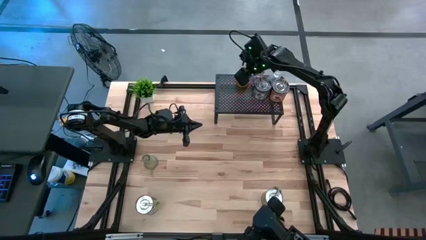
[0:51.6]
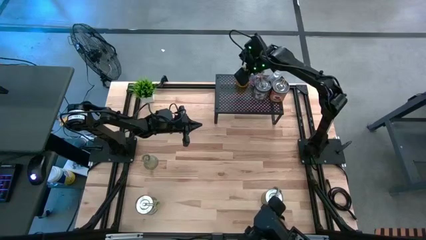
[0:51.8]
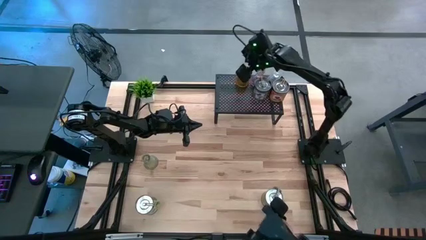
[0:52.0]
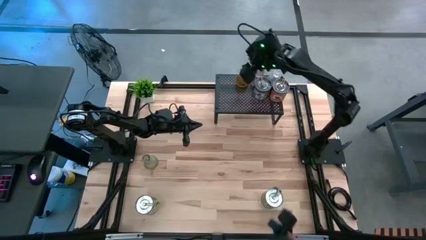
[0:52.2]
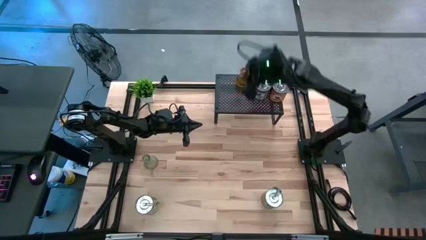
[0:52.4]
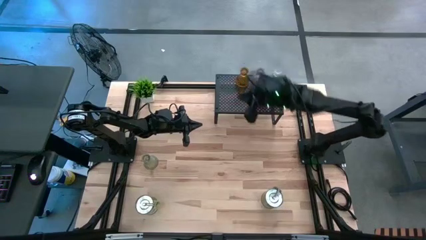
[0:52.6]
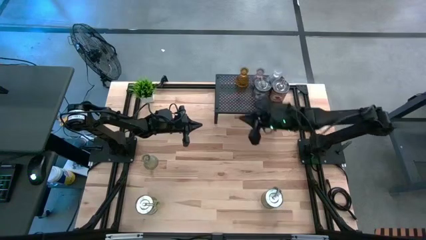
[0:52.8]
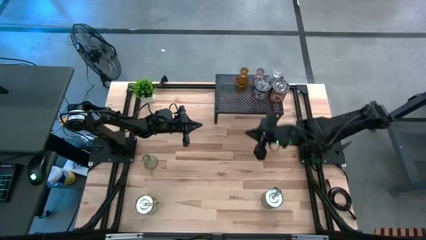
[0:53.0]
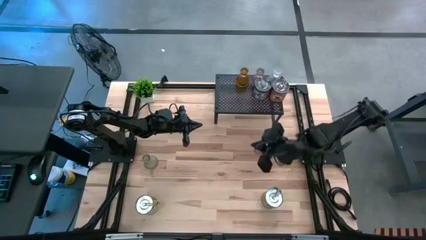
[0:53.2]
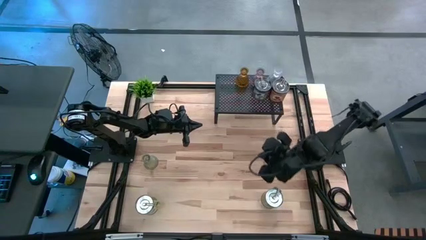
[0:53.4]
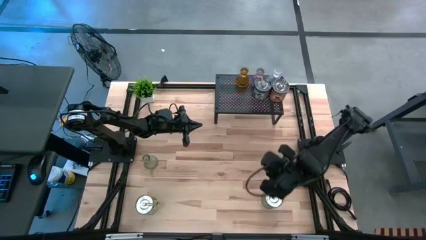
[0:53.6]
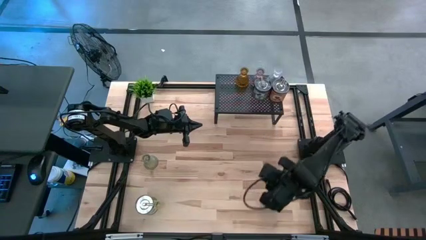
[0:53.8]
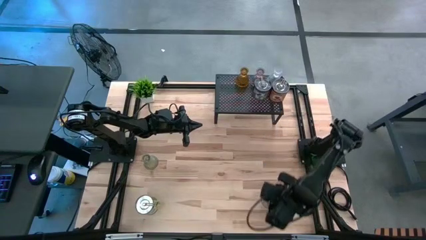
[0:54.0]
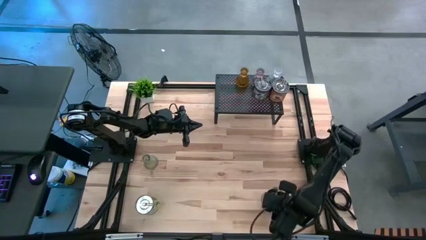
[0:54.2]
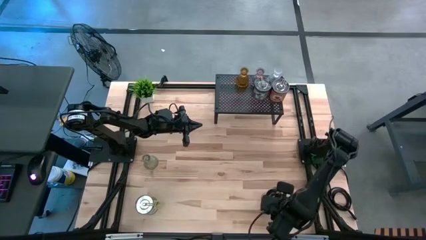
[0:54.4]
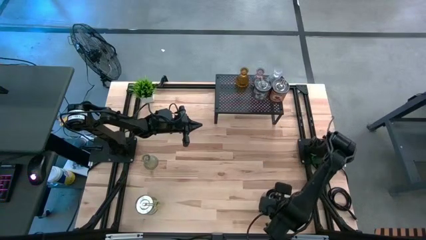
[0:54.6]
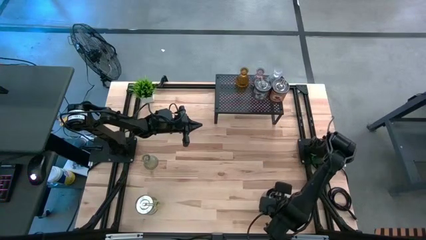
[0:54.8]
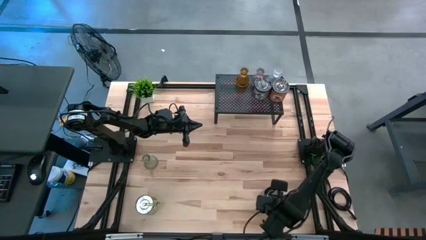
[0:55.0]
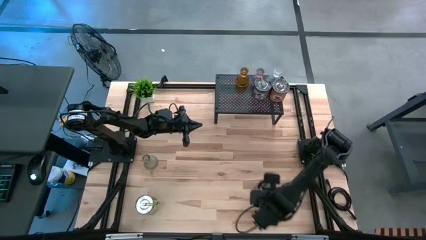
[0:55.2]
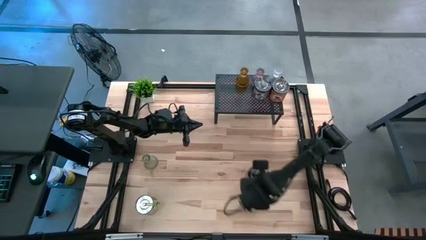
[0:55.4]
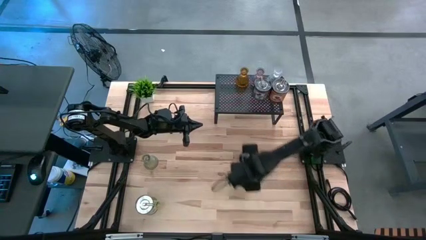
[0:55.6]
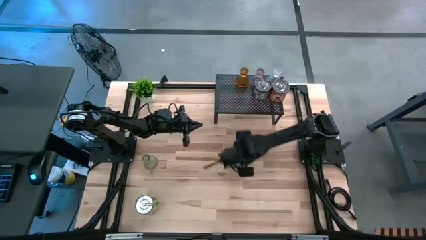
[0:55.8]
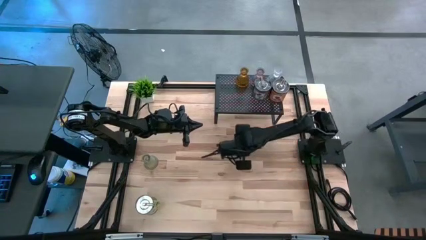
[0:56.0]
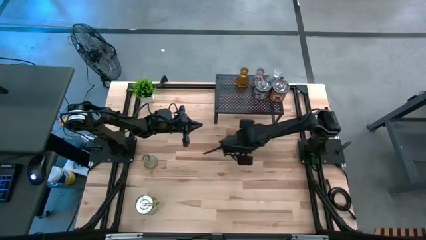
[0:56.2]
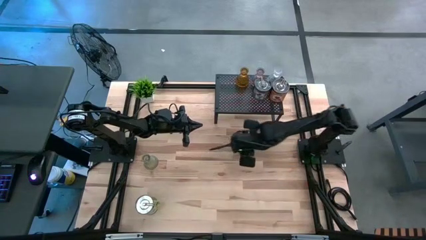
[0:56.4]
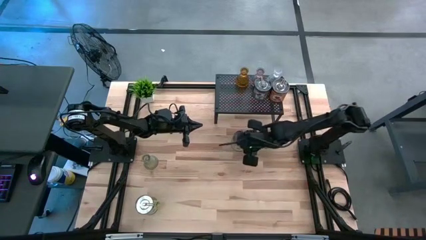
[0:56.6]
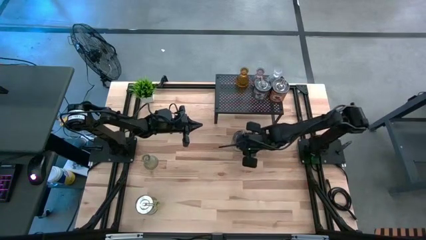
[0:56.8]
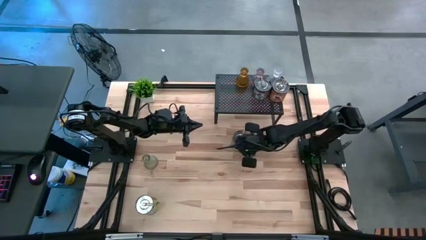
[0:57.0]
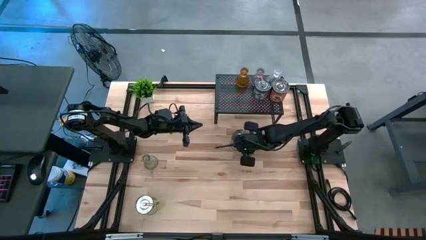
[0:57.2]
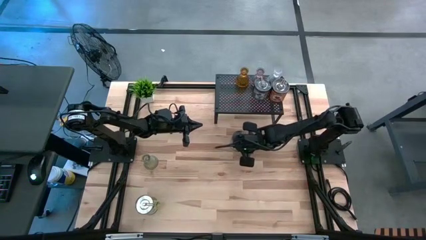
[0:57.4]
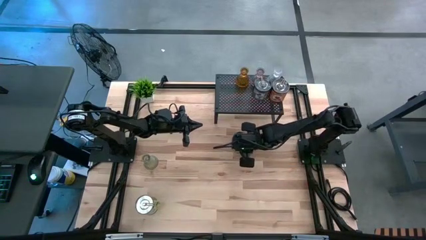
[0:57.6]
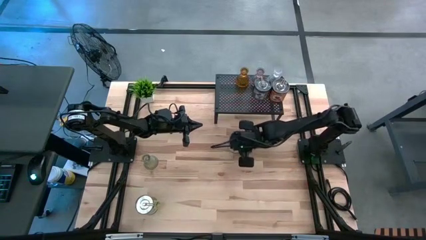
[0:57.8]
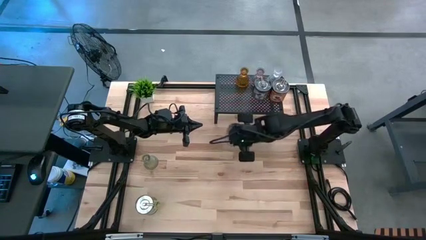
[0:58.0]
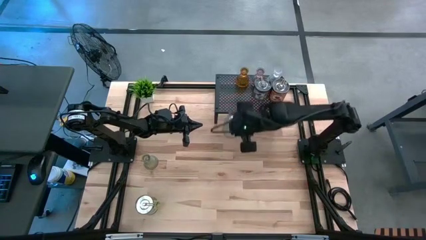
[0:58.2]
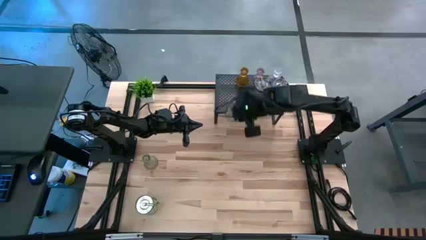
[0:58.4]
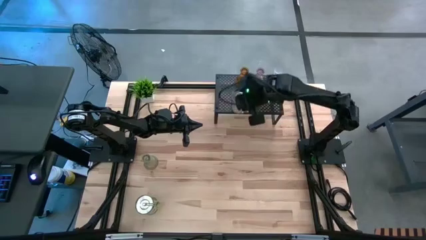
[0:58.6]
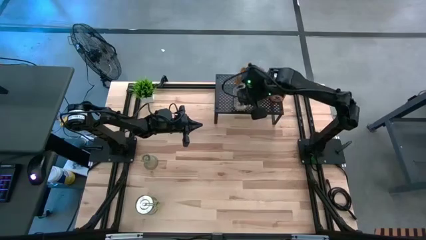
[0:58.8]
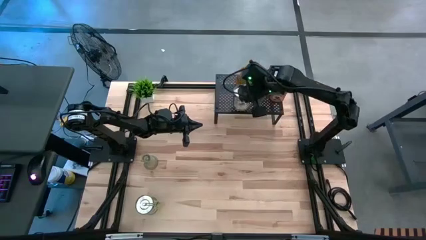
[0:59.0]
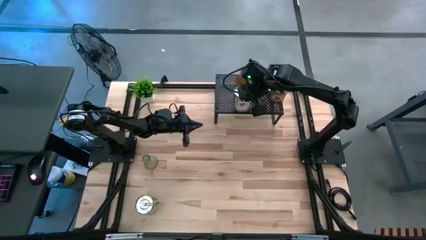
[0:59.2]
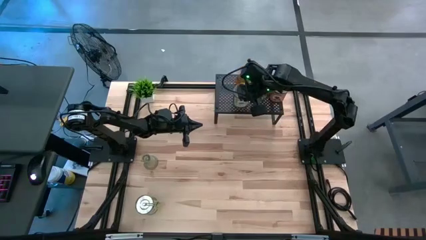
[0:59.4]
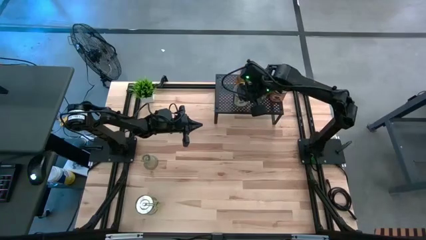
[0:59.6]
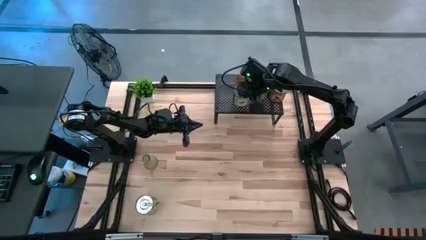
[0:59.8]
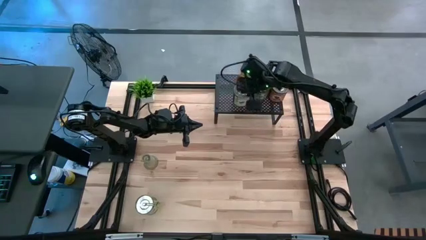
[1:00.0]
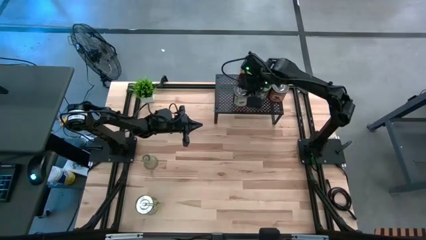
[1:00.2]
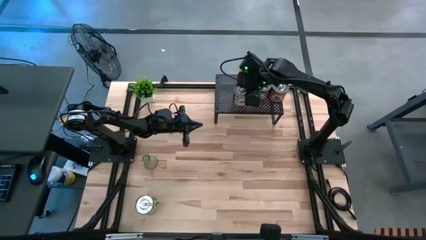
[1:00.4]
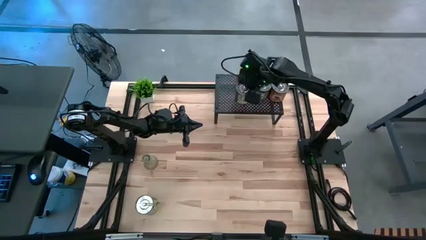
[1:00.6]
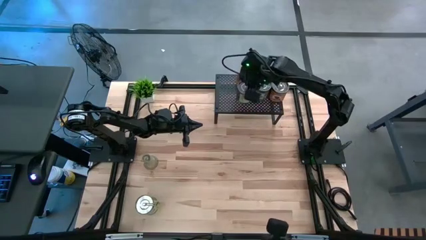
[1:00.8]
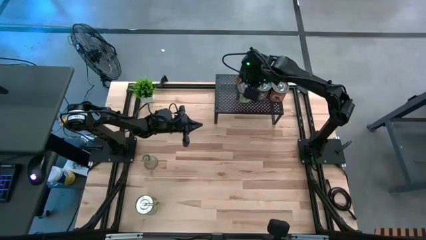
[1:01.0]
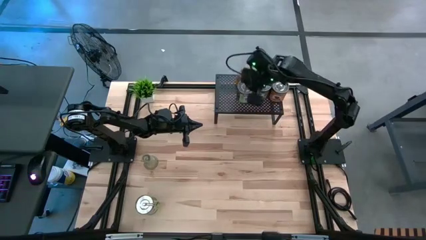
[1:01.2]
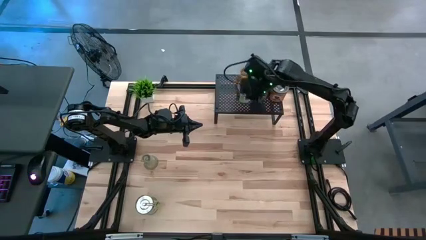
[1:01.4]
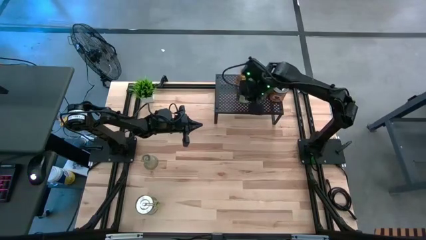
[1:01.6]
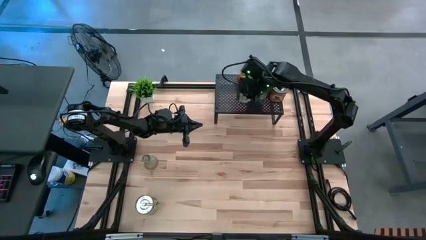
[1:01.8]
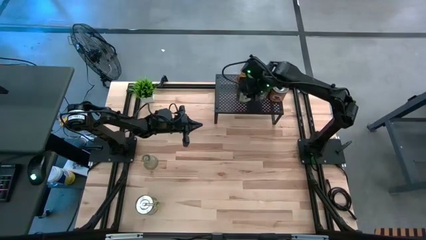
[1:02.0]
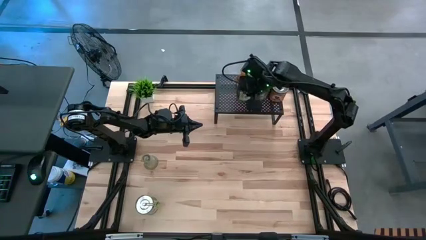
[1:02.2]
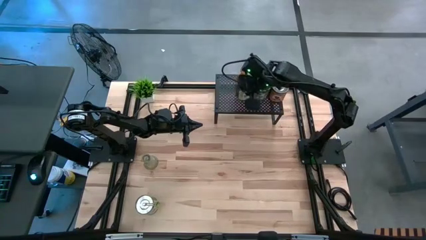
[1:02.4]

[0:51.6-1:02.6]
Task: Pick & Place candle stick holders
Put the right green scented candle on the shelf aligned with the brown scented candle

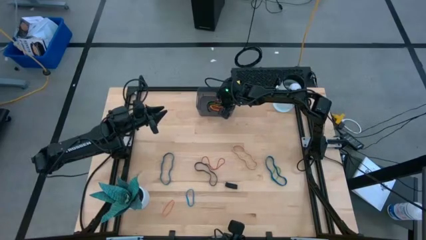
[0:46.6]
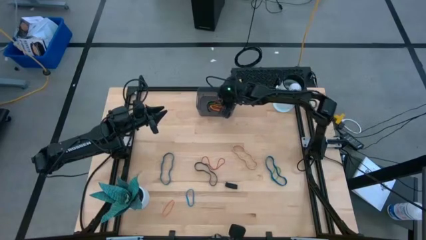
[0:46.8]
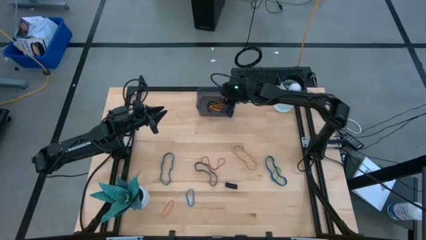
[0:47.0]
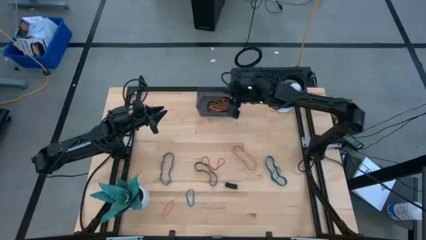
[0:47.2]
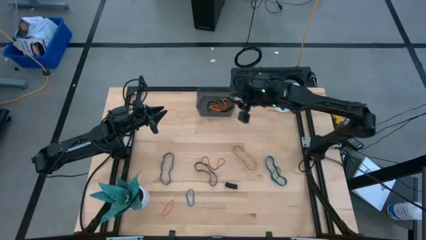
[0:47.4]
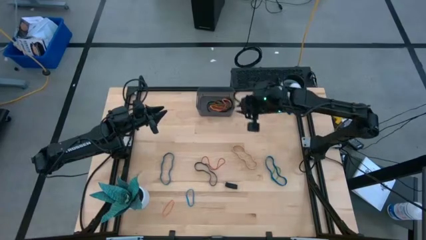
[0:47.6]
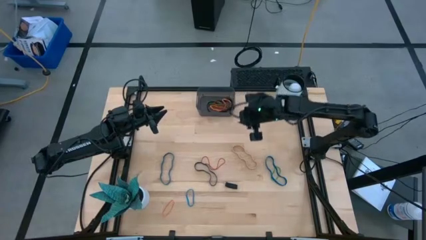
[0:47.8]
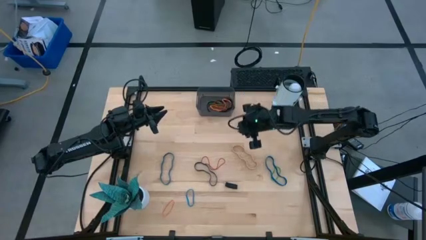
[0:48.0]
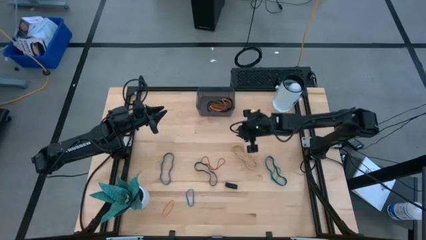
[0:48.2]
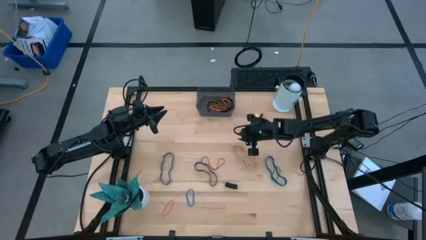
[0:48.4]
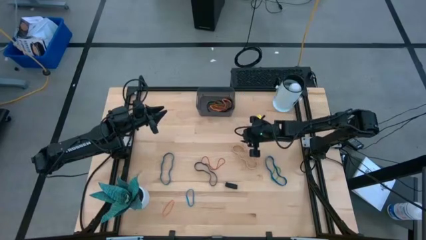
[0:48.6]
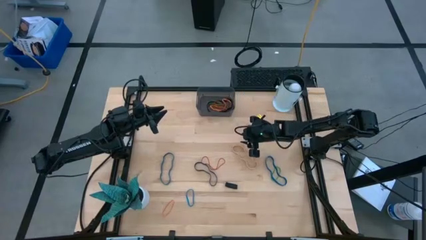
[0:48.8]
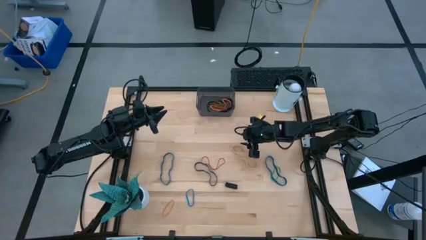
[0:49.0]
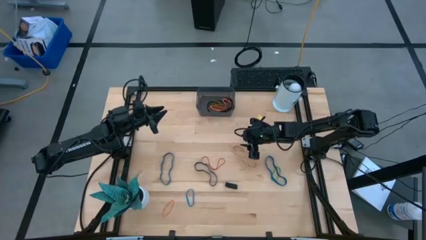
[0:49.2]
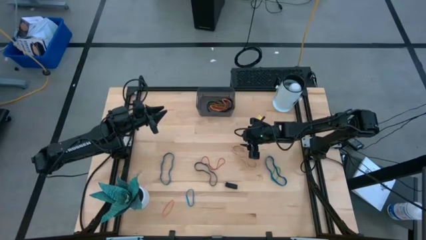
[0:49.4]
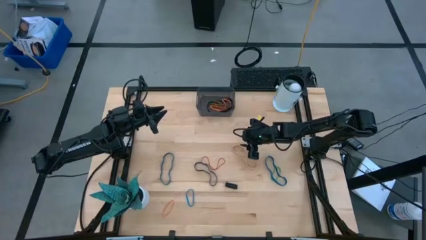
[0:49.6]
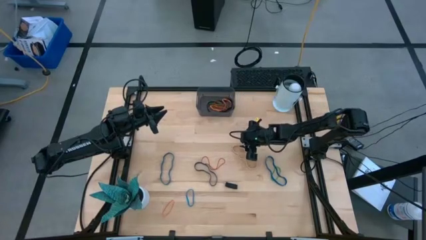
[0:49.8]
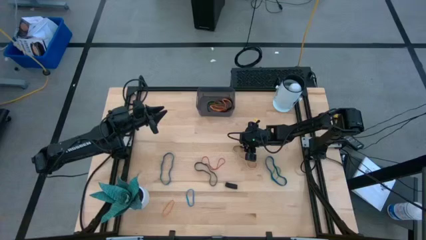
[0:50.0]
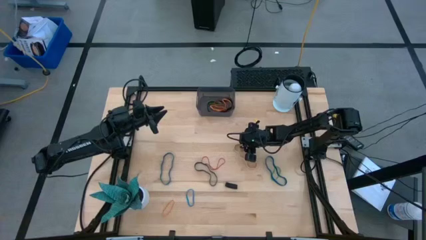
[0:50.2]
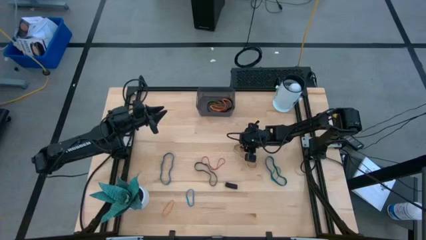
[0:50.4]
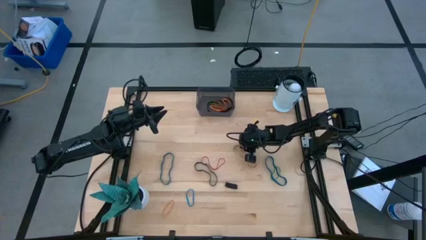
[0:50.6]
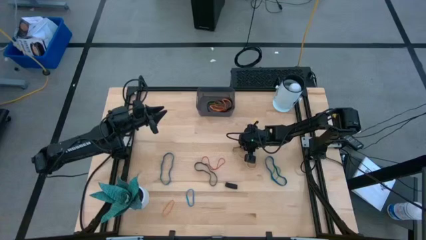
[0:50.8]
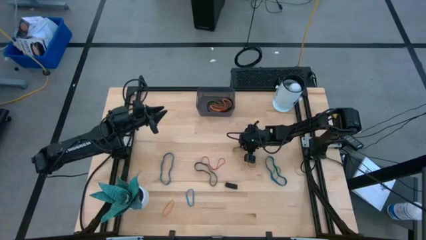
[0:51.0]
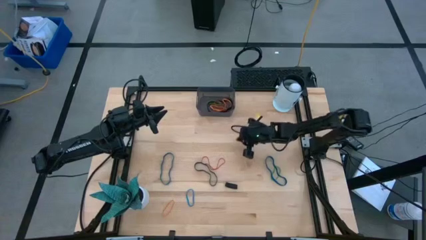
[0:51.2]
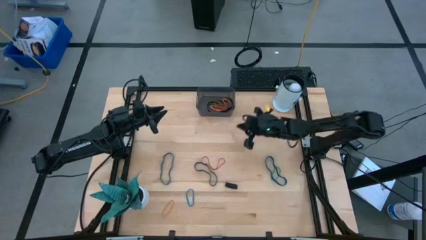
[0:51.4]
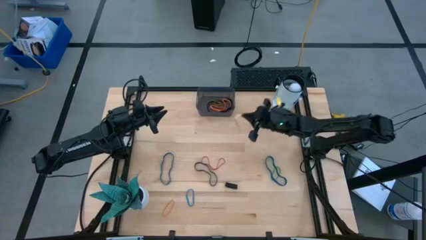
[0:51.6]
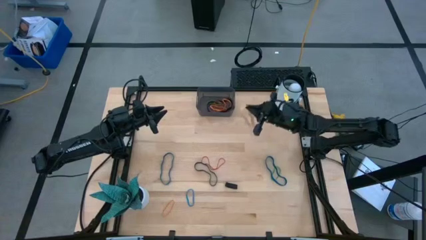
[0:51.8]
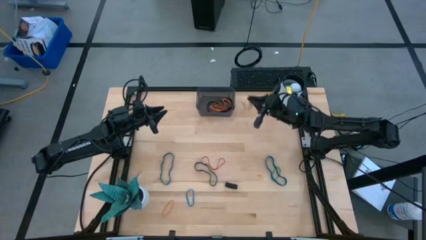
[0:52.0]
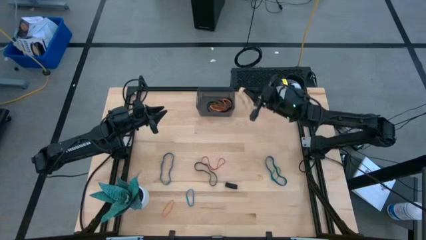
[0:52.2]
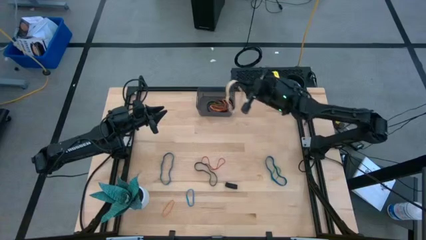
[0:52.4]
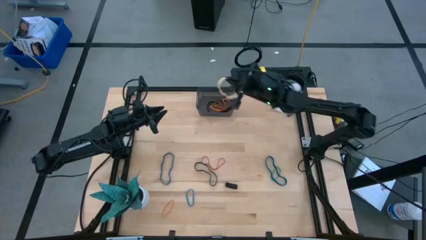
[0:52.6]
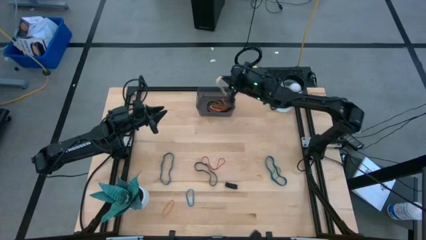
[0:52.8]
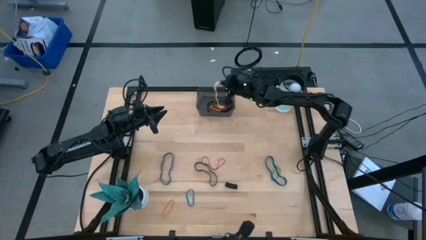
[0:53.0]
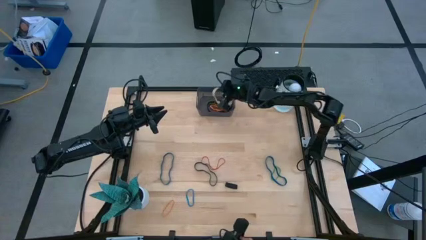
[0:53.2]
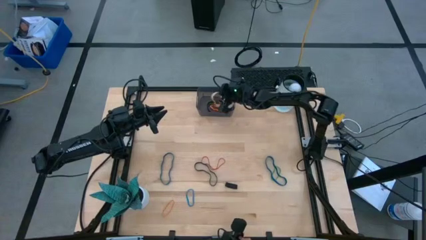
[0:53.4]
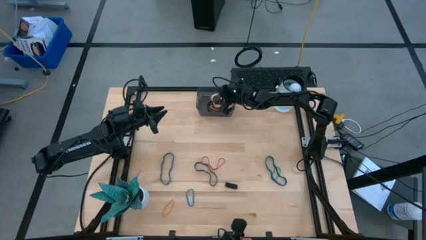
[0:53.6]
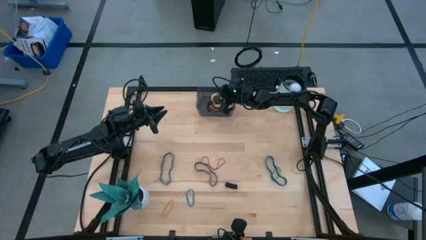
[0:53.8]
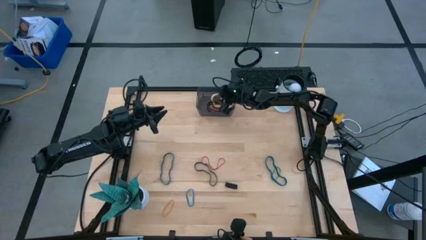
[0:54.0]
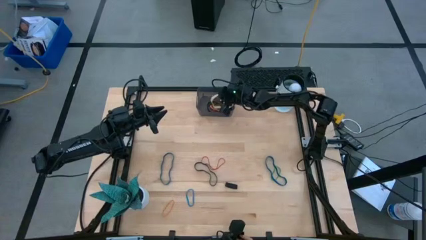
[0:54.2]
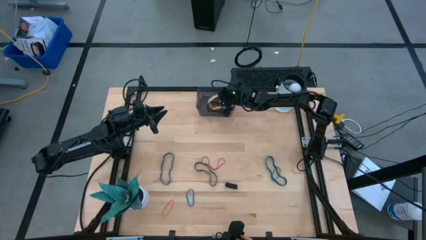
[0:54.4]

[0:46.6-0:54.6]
Task: Pick and place rubber bands into bin
Put the brown rubber band into the black bin
